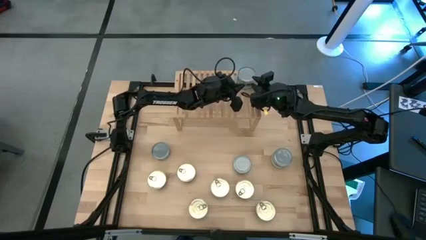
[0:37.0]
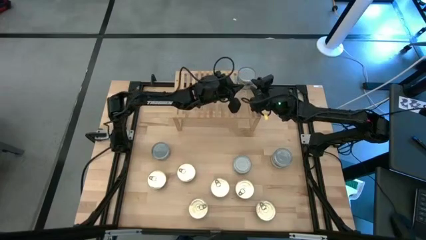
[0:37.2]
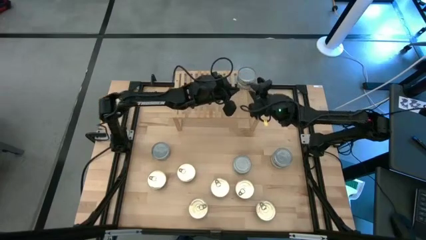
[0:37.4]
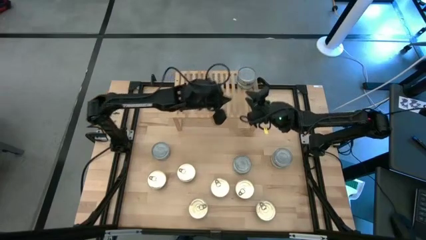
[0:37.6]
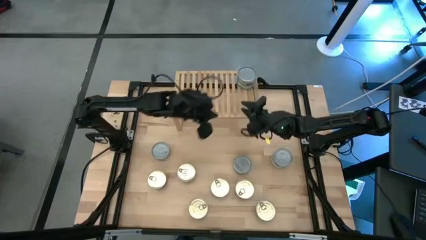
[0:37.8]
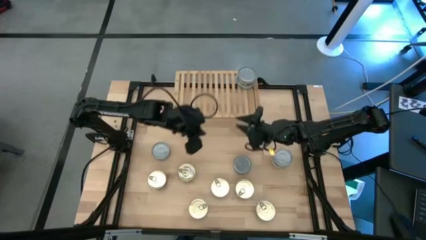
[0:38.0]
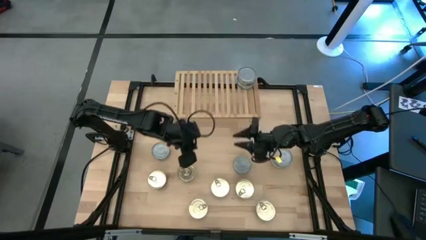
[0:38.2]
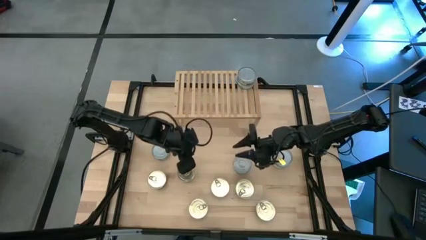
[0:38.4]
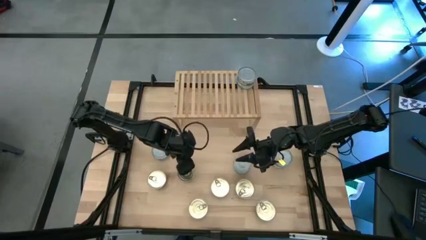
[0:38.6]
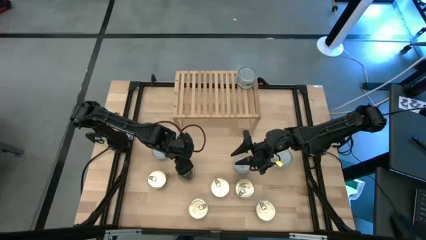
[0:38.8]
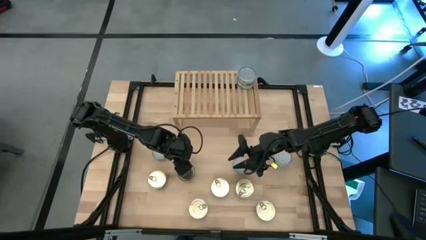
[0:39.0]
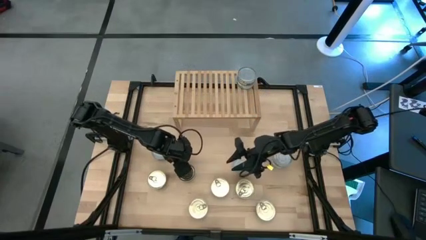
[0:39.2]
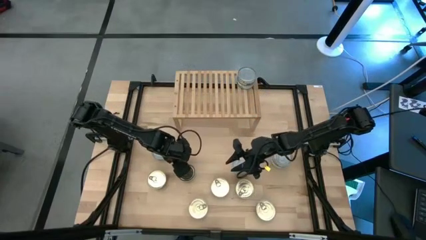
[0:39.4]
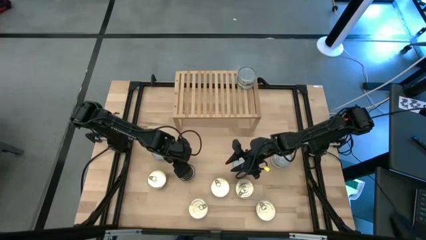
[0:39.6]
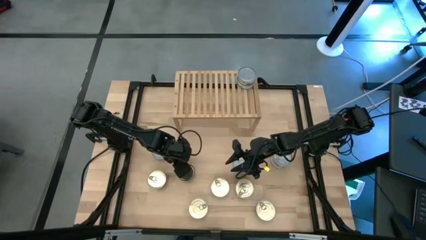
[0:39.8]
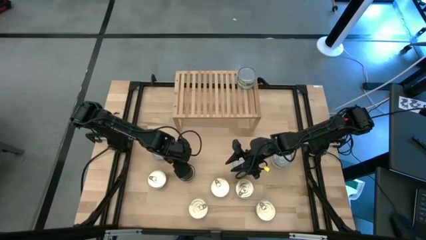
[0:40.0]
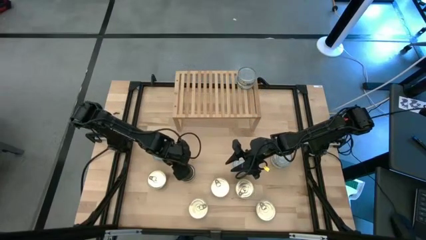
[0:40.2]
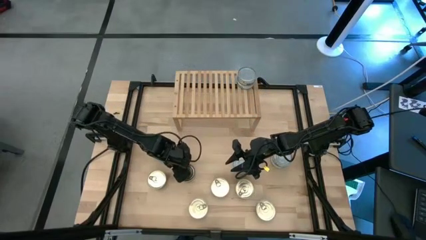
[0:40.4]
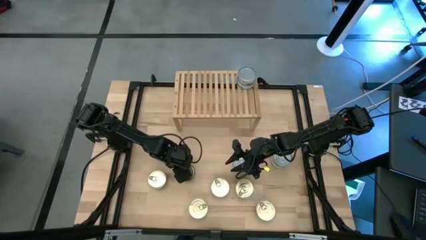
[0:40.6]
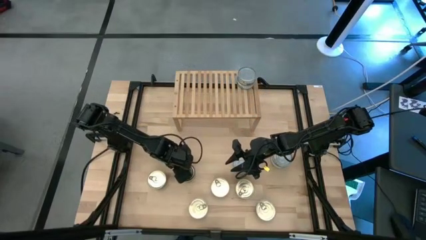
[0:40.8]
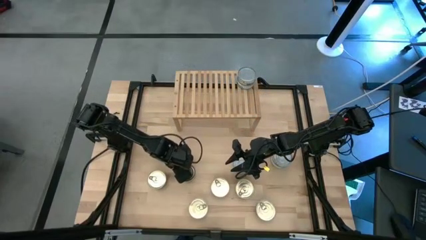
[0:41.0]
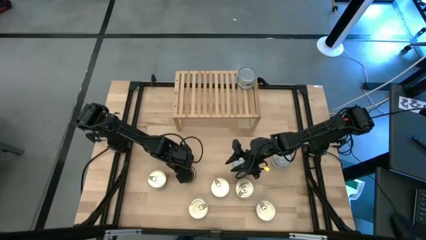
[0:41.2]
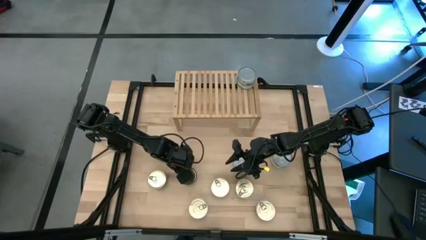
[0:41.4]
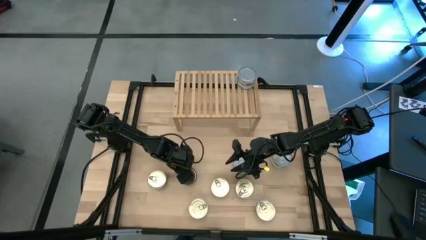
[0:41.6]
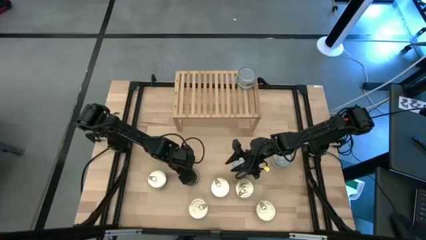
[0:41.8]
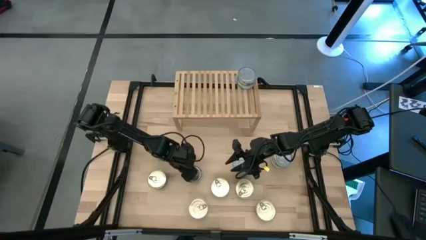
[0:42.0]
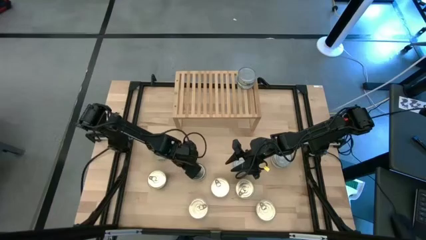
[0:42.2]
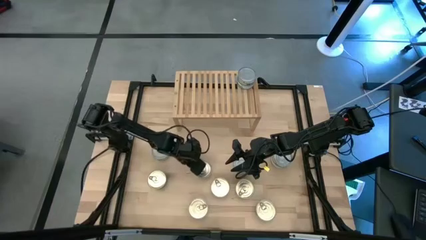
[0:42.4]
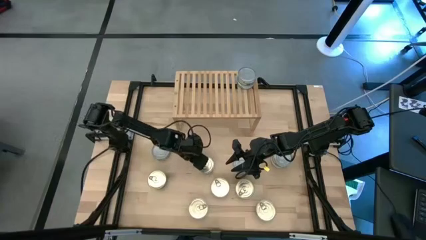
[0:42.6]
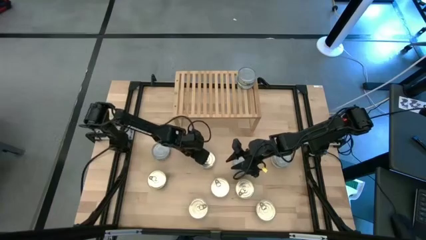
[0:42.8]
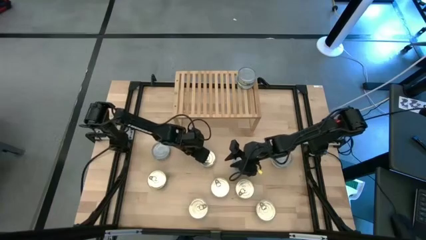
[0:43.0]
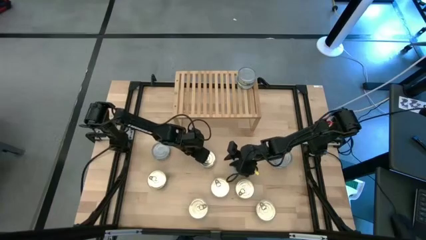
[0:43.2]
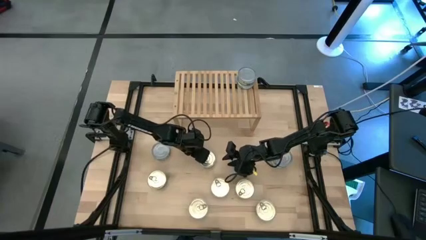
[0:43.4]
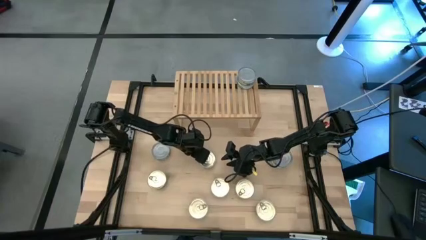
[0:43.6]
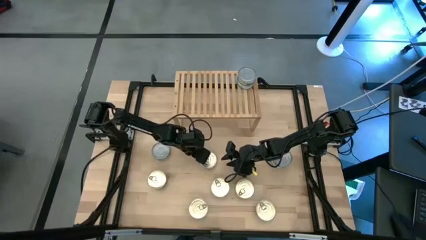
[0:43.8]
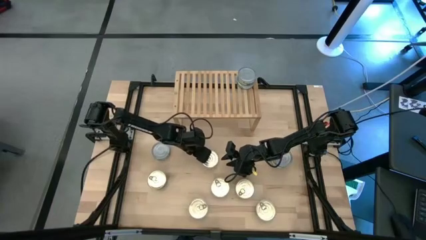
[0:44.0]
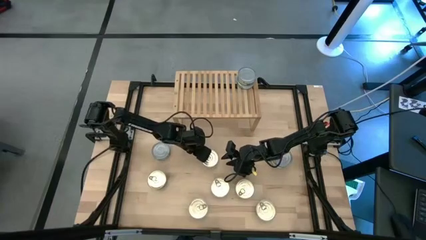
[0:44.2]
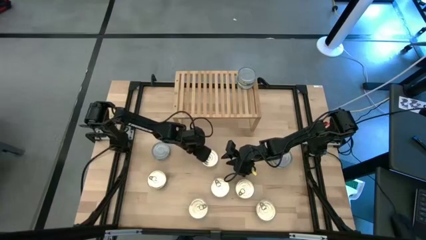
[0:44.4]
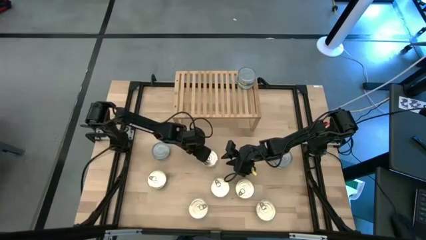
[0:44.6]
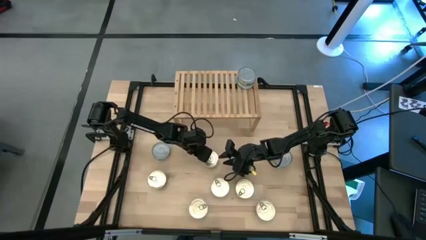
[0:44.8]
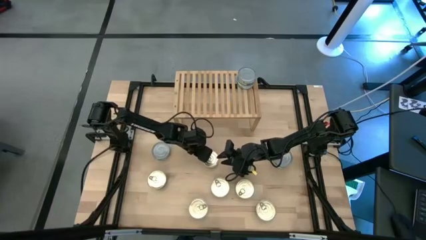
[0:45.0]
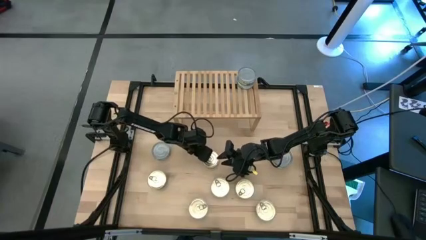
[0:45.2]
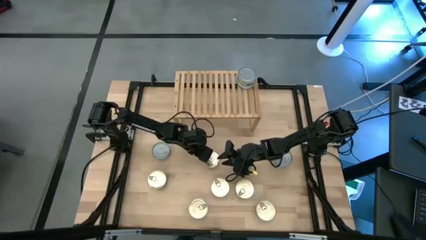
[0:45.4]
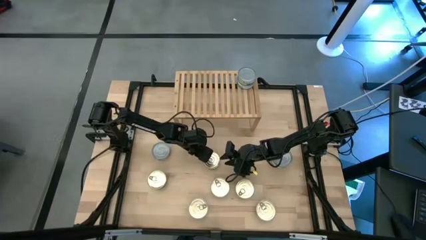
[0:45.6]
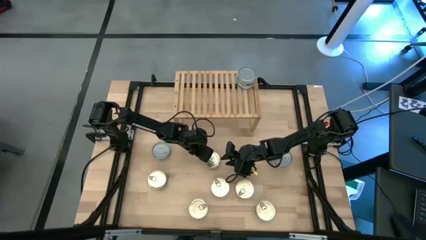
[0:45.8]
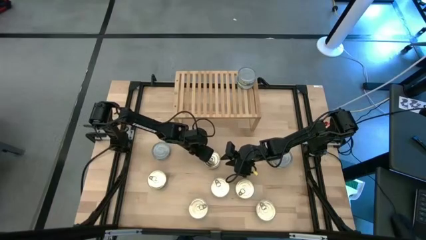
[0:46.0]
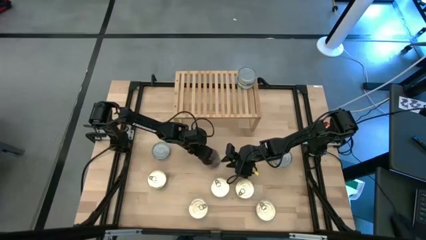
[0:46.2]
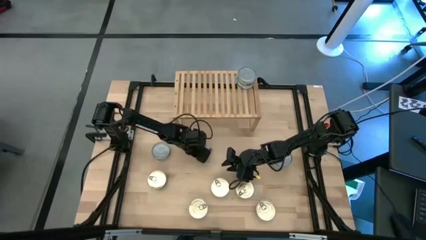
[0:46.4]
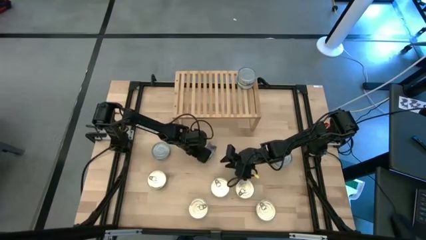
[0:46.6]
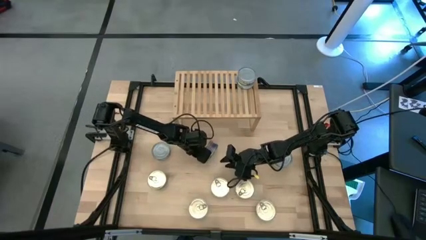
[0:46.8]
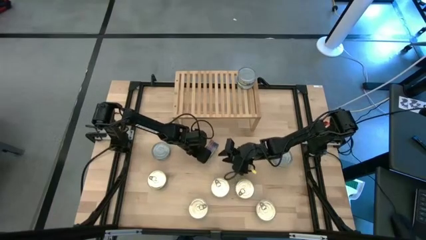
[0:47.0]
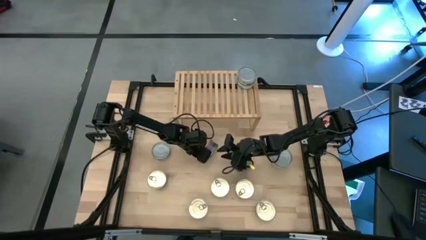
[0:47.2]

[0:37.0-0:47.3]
Task: Stack canned seafood by type on shelf
Put the blue tuna can on the shelf
